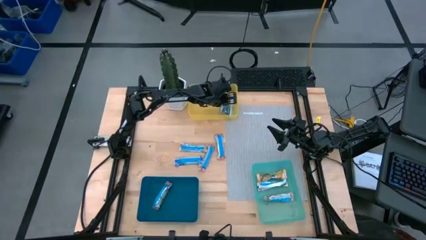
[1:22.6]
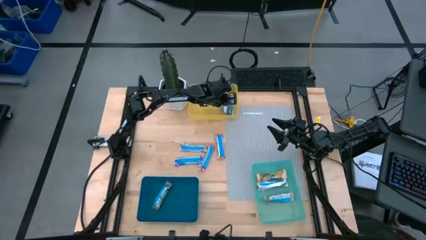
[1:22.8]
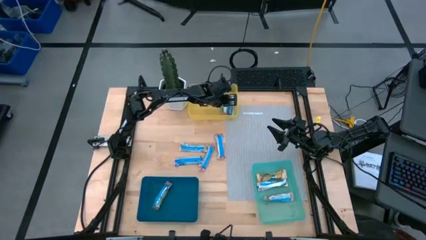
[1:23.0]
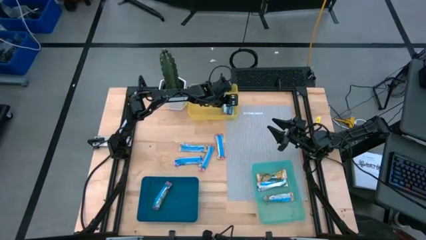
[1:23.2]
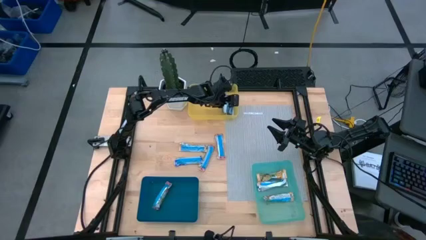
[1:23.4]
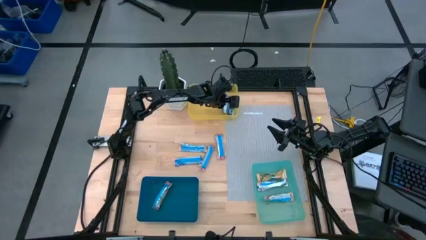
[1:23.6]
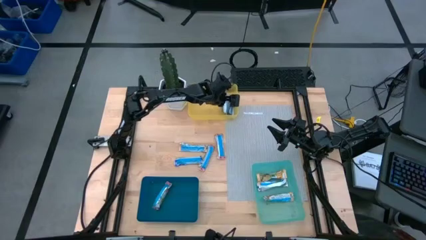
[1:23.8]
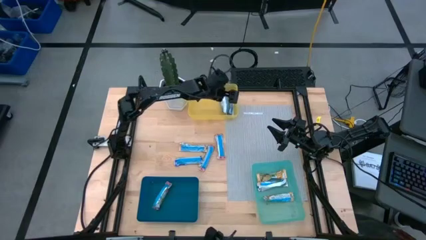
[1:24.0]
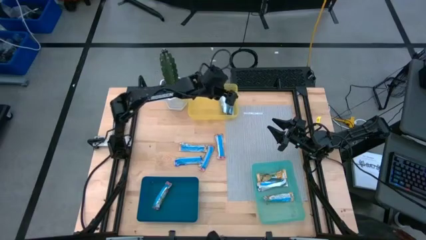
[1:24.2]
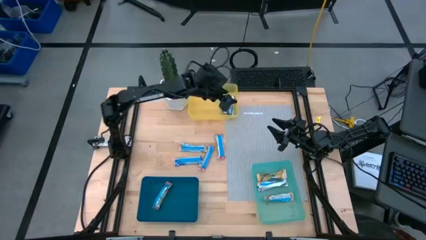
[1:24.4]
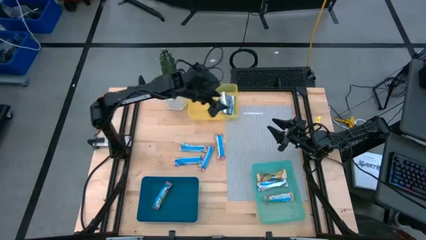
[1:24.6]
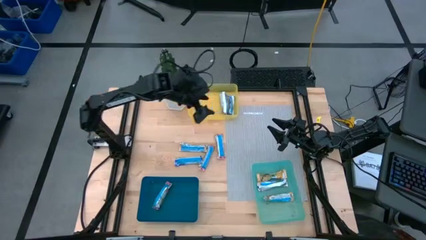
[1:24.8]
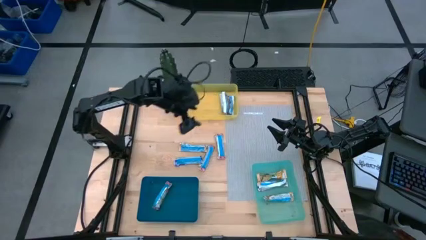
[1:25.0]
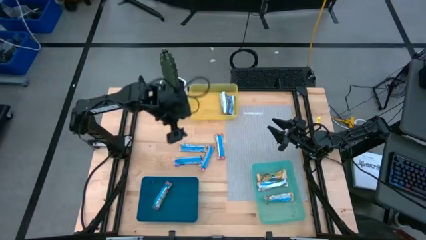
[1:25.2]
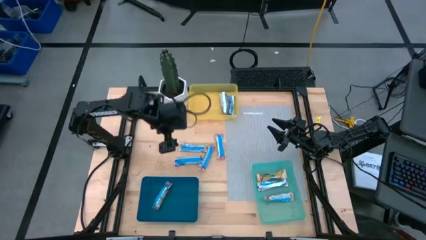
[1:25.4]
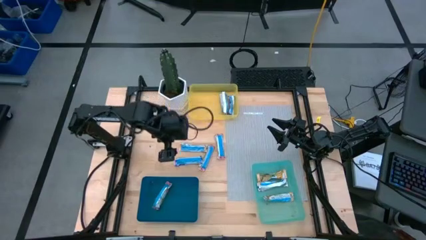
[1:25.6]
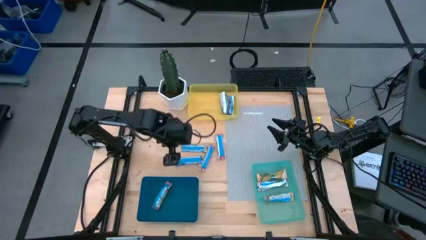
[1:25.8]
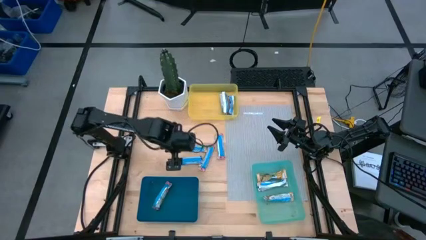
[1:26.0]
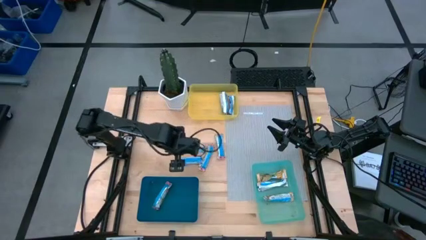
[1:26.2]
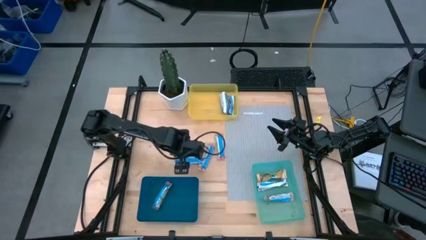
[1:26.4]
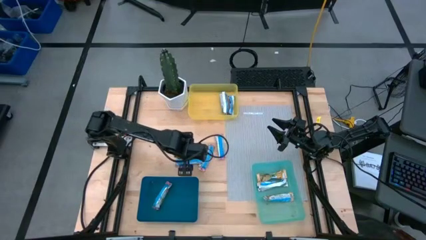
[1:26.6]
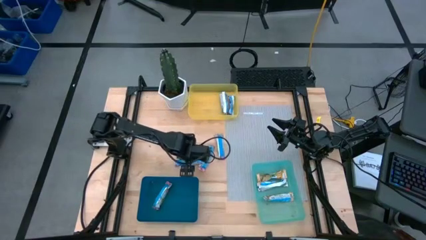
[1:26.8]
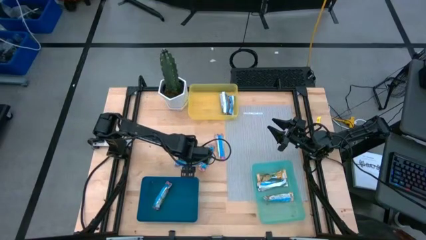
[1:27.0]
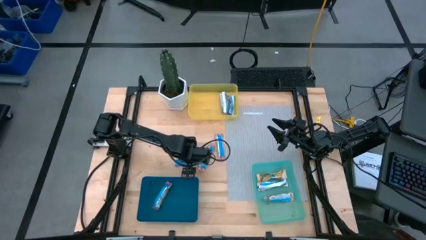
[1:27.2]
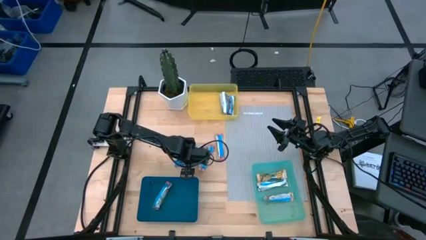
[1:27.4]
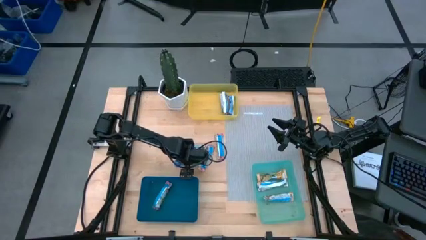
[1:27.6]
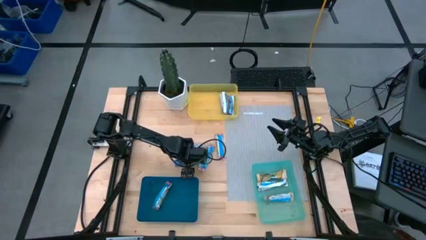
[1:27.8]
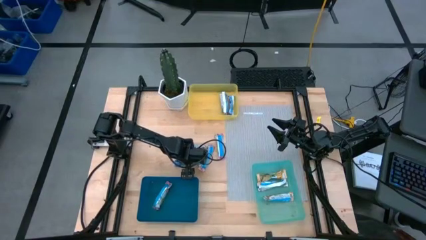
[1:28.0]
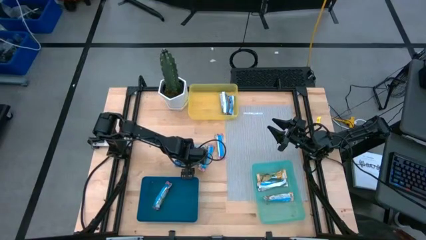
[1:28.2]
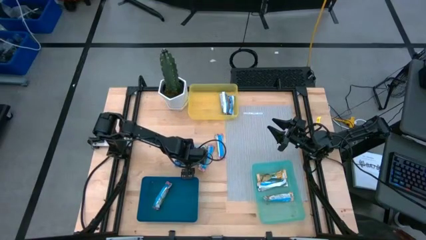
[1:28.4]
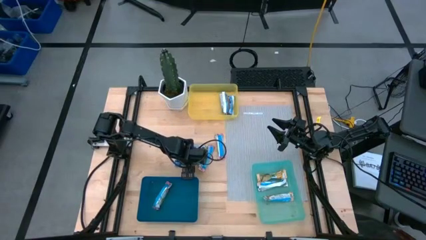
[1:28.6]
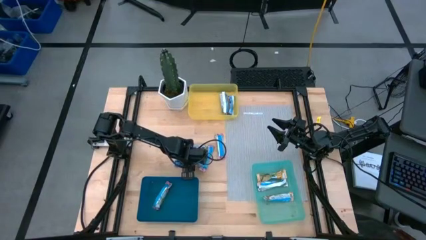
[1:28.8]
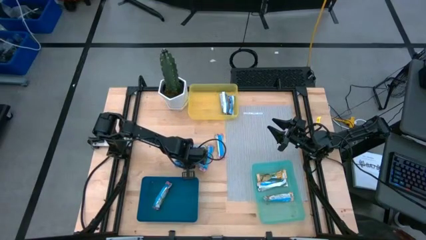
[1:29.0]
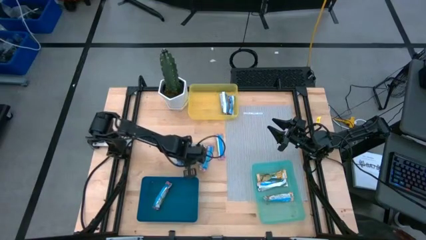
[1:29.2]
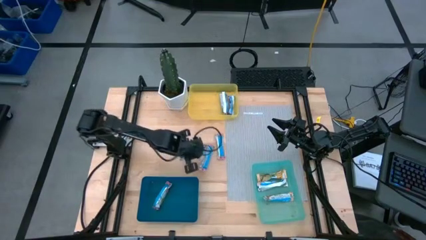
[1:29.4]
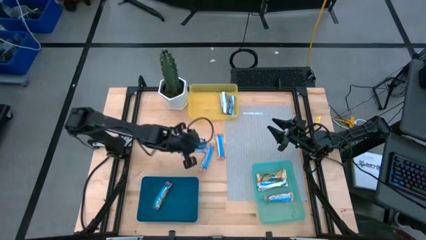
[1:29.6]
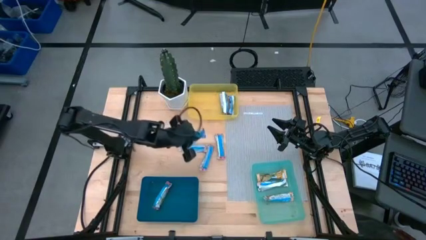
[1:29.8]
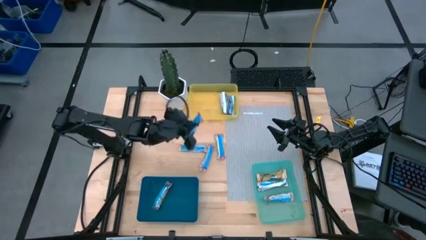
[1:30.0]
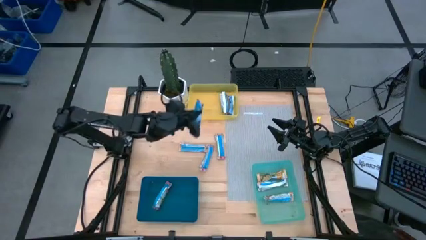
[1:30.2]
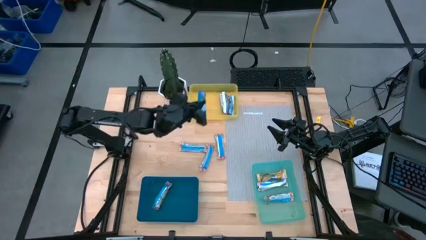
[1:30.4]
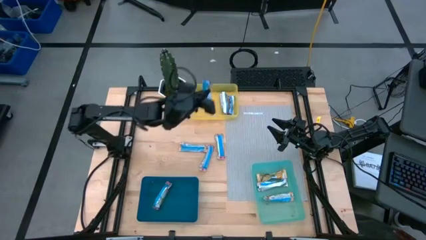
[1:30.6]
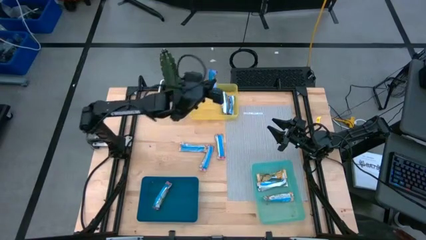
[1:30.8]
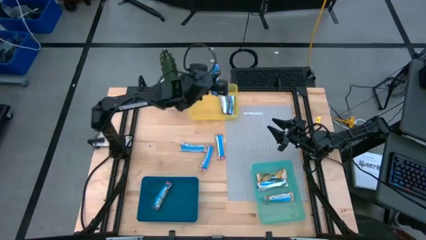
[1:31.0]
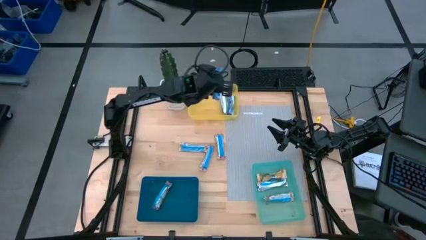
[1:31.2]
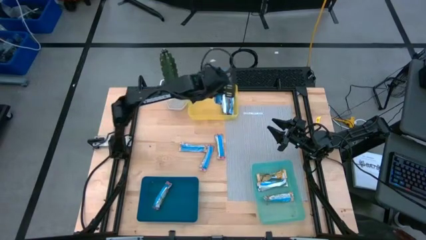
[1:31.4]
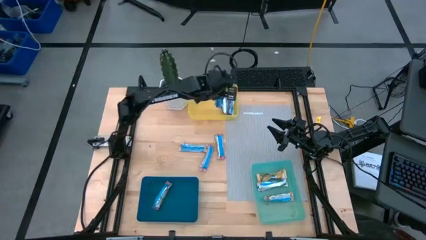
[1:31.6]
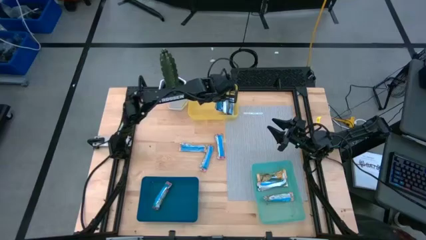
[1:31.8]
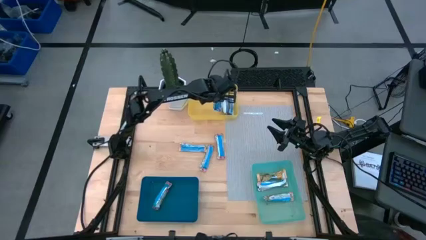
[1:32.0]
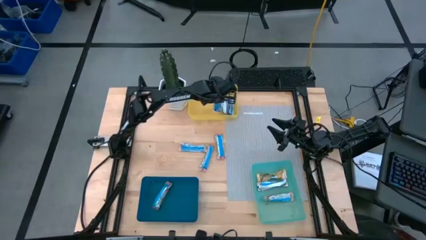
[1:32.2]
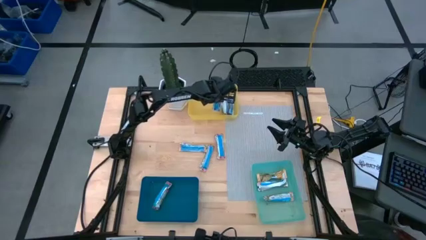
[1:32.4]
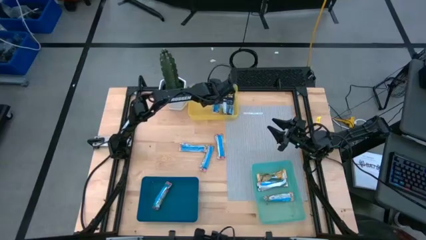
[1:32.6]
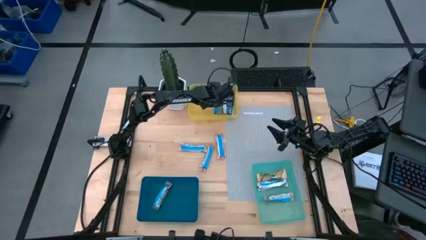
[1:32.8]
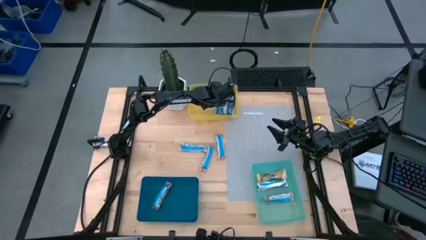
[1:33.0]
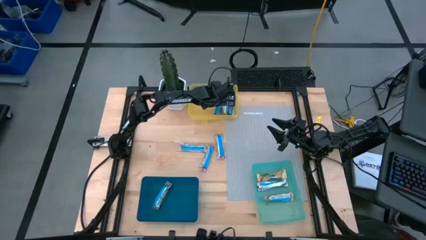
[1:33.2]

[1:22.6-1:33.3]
Task: Pick and place Granola Bars by type
Put the blue granola bar into the yellow bin

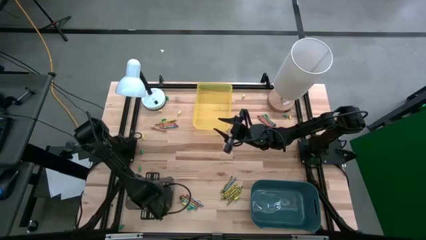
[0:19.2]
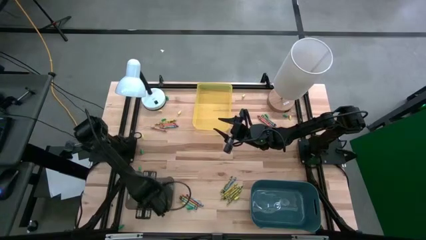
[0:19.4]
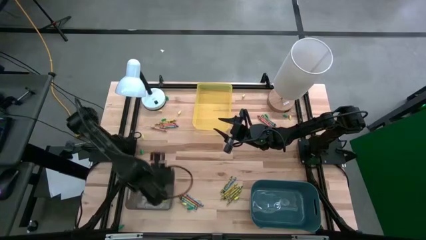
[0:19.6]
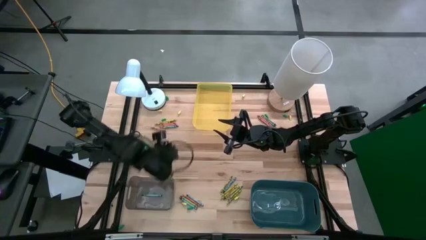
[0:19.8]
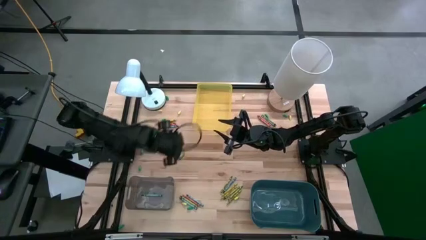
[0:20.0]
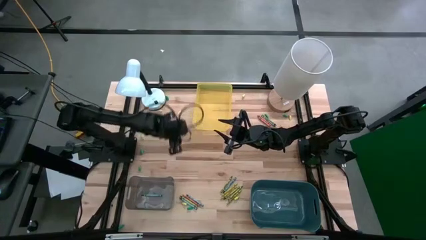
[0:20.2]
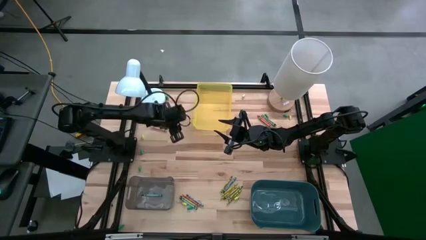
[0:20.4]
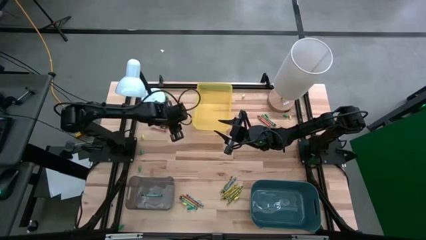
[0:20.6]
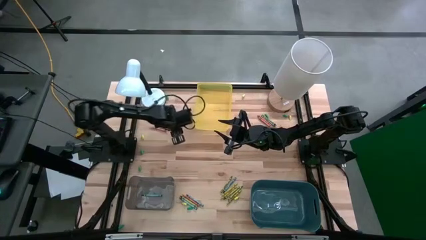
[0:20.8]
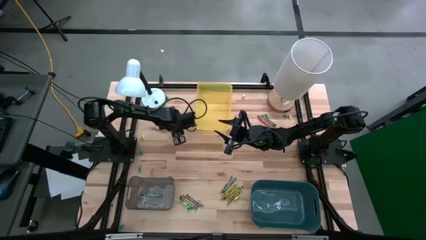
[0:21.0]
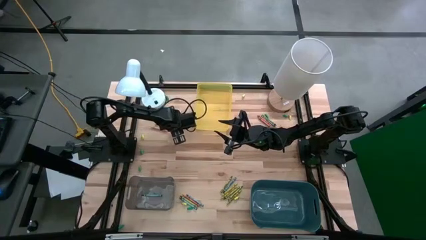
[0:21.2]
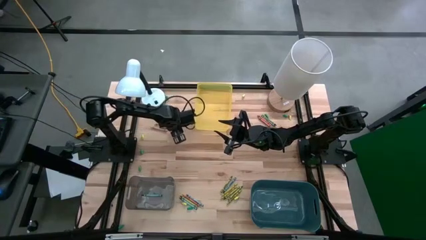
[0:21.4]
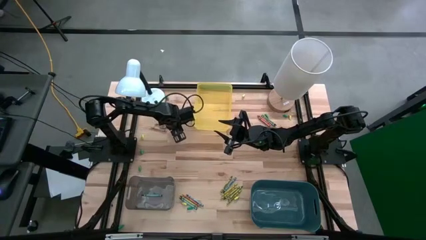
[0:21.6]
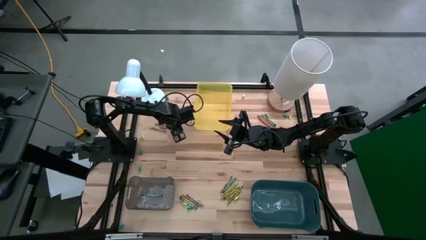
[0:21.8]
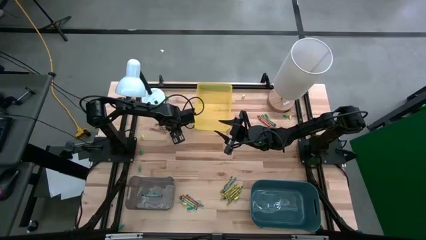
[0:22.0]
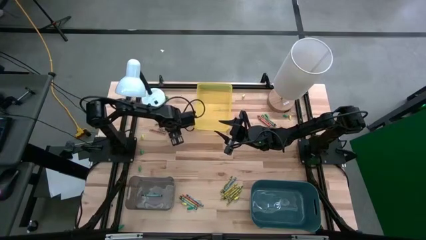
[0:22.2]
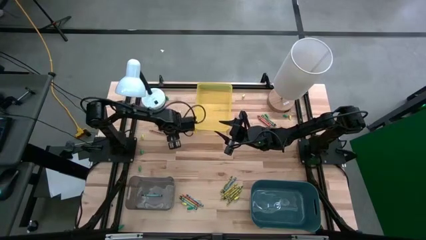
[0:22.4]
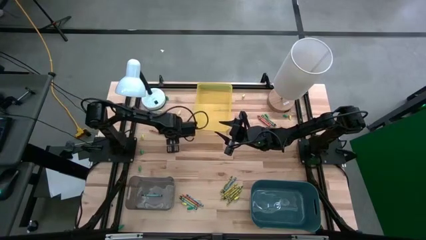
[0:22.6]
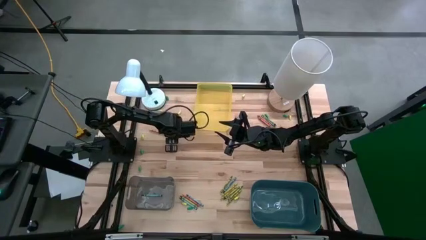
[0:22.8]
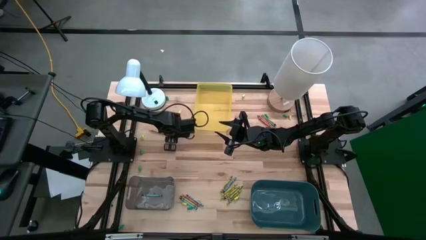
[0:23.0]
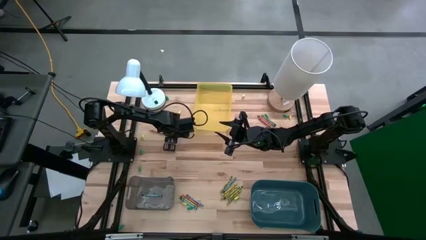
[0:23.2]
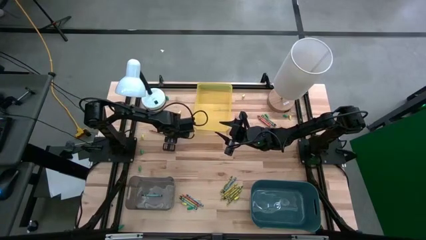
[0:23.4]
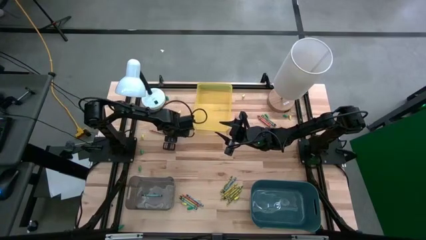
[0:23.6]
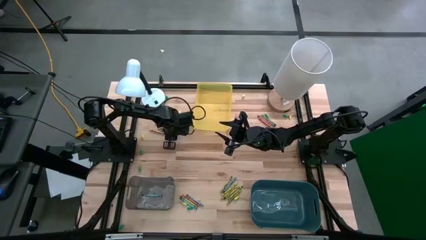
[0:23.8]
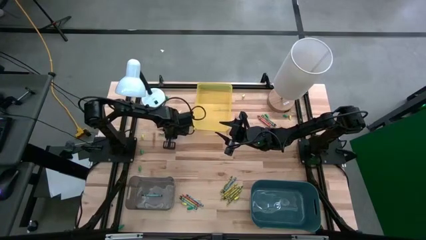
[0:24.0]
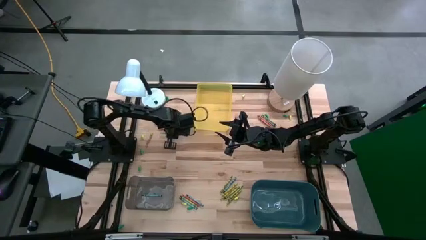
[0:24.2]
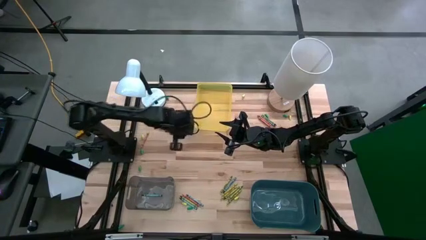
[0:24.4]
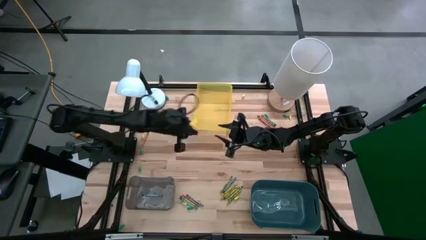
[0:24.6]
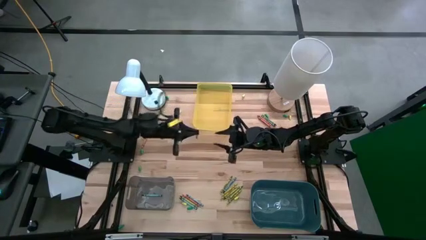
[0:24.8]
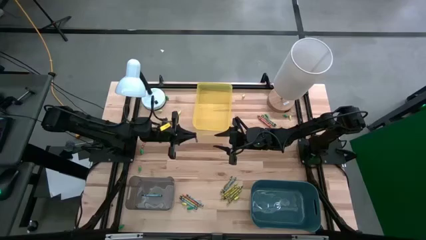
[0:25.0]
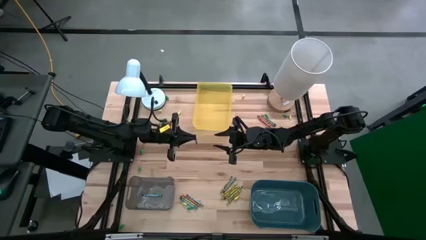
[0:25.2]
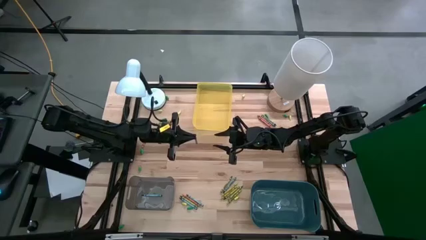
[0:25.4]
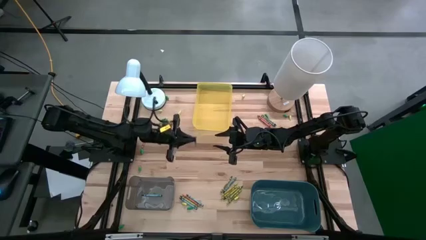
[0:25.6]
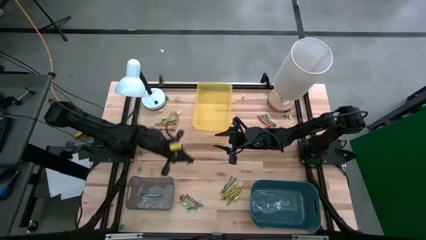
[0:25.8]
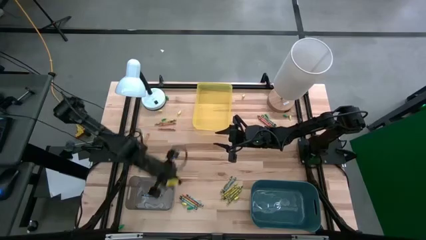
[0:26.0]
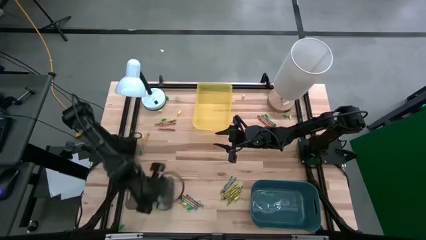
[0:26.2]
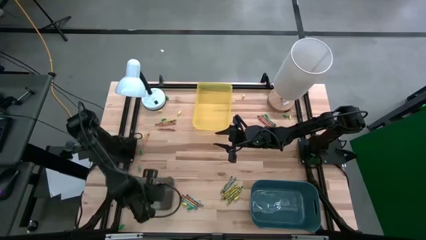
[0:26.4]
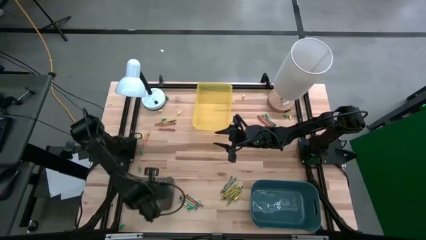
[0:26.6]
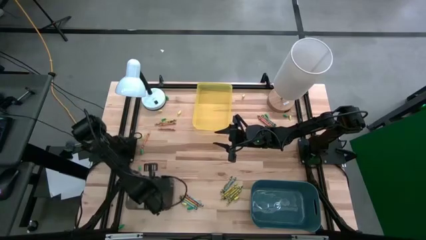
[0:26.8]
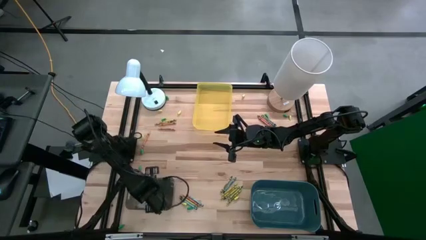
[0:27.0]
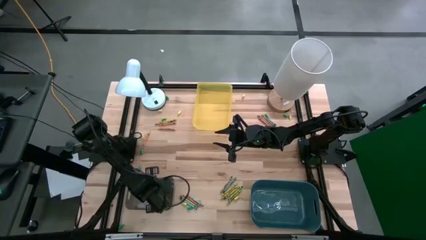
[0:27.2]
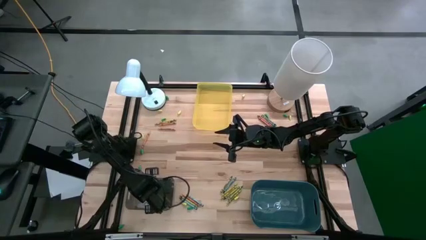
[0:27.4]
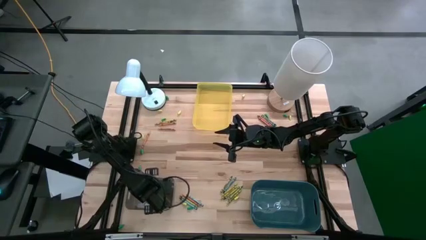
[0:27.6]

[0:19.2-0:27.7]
Task: Sort crayons
Put the blue crayon into the black bin
